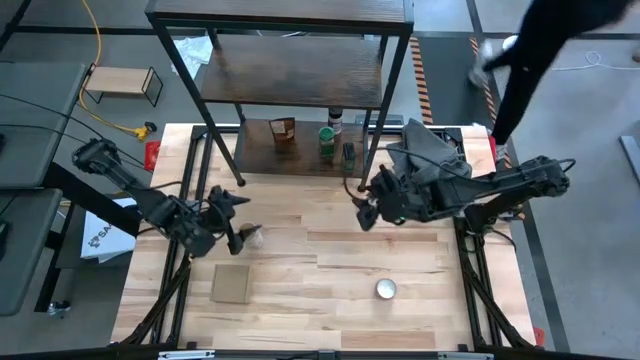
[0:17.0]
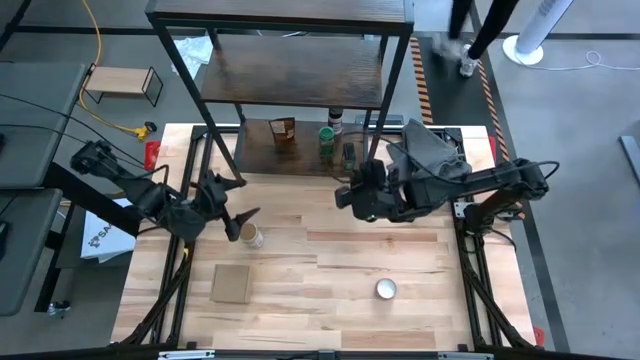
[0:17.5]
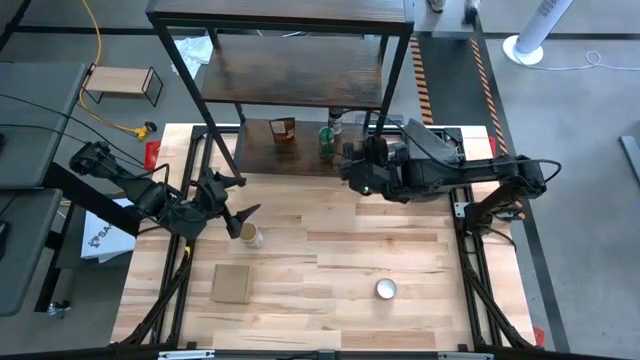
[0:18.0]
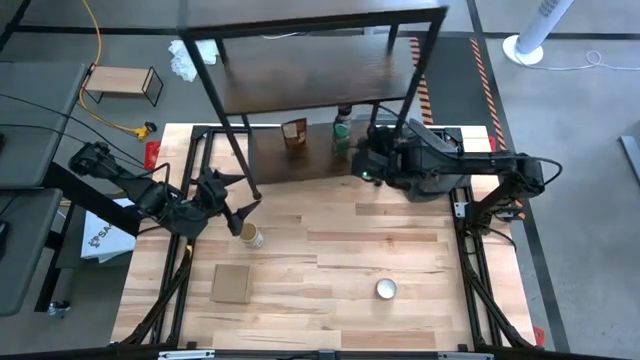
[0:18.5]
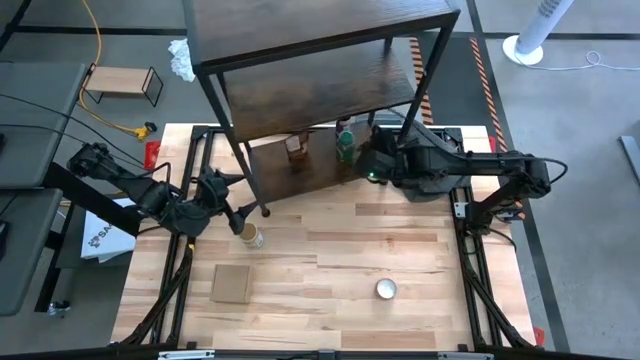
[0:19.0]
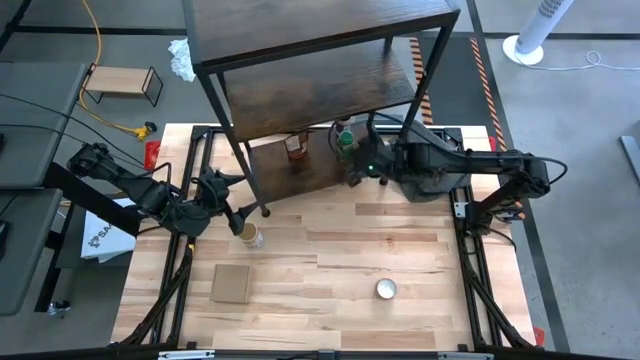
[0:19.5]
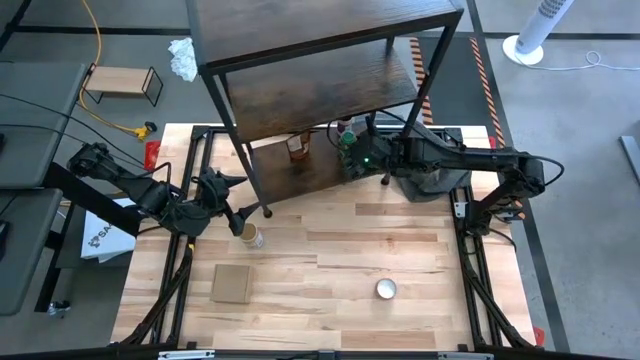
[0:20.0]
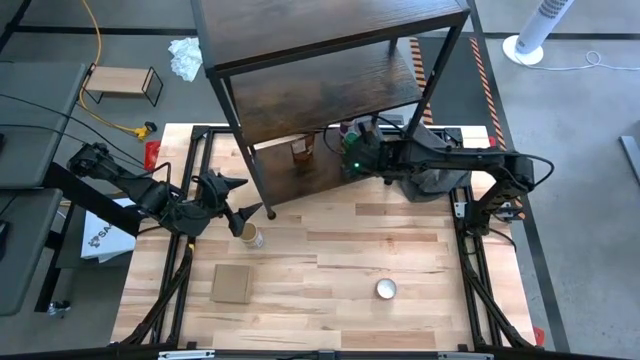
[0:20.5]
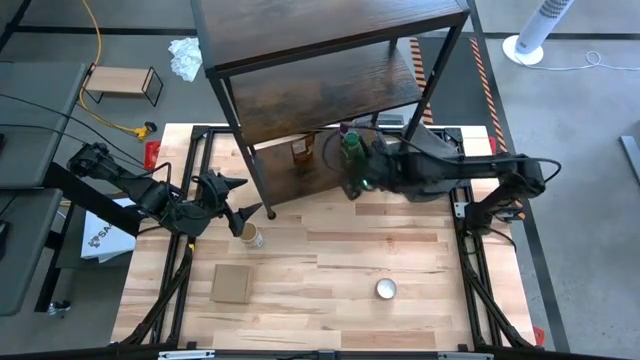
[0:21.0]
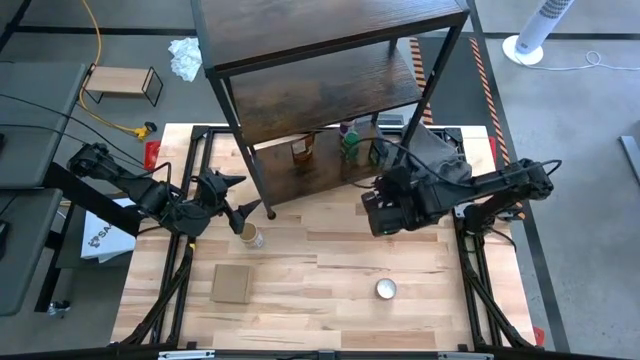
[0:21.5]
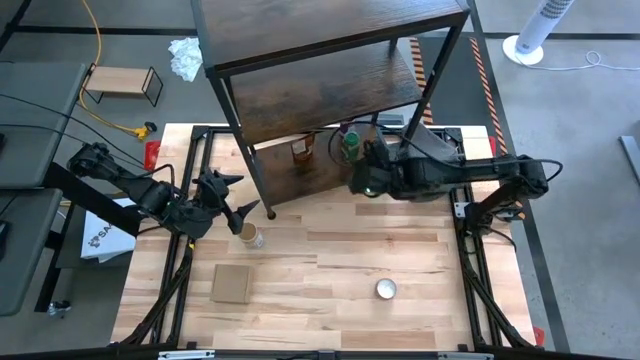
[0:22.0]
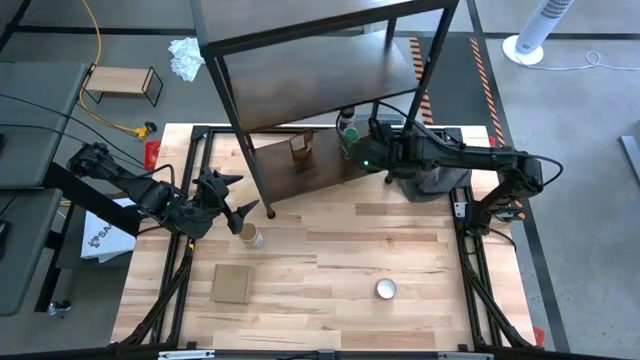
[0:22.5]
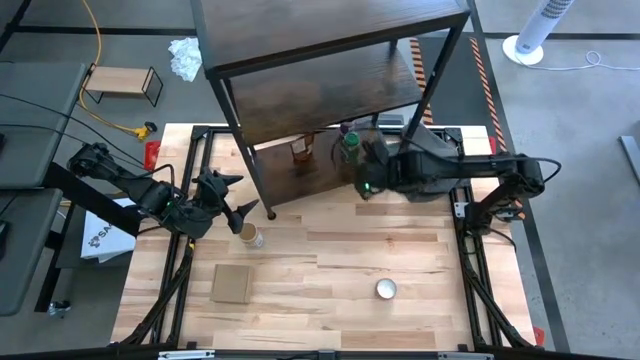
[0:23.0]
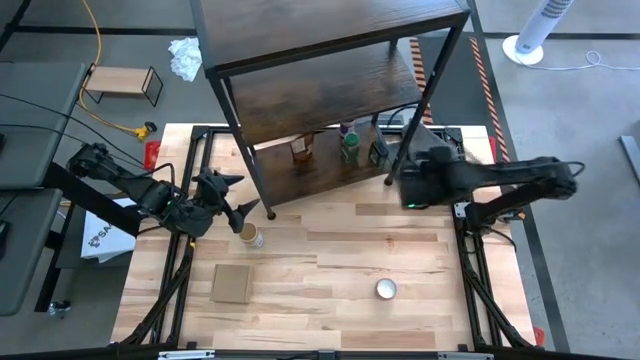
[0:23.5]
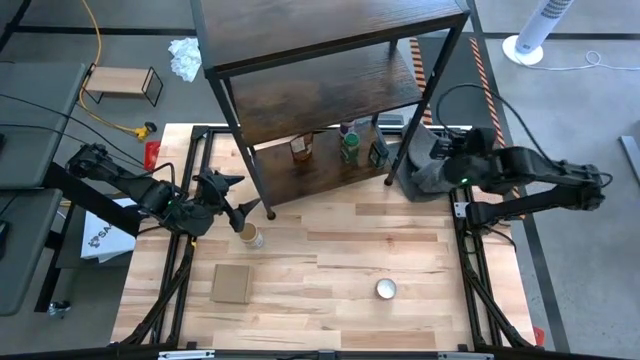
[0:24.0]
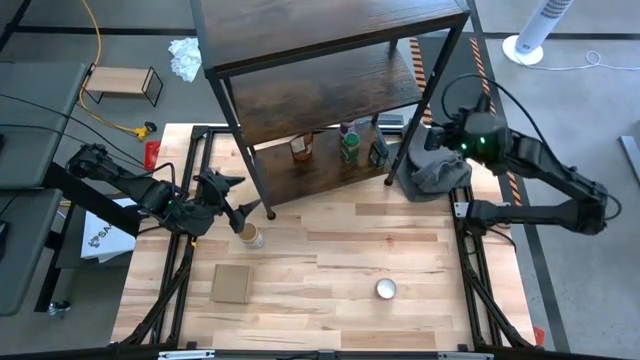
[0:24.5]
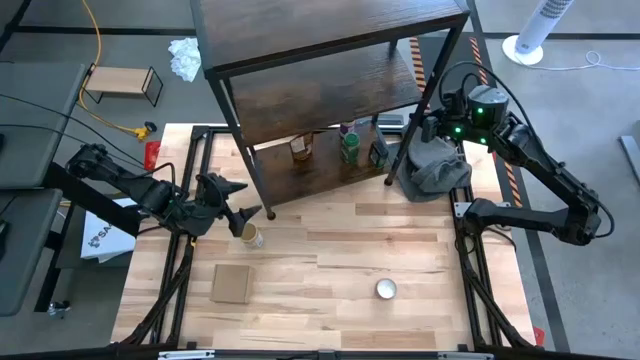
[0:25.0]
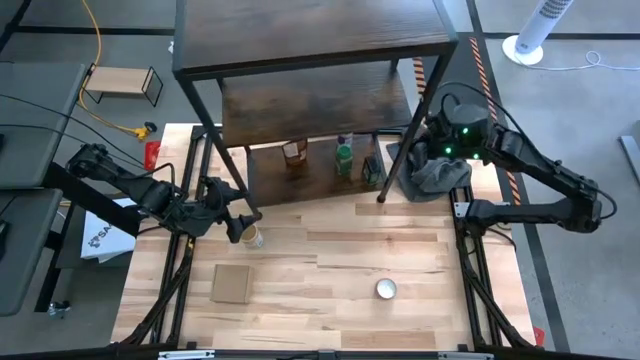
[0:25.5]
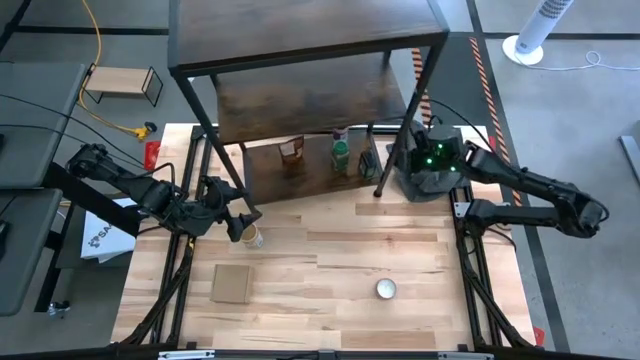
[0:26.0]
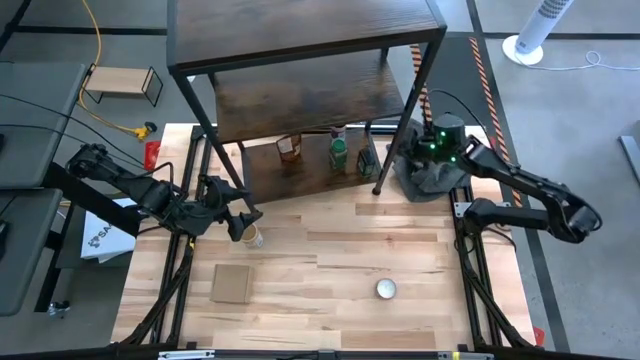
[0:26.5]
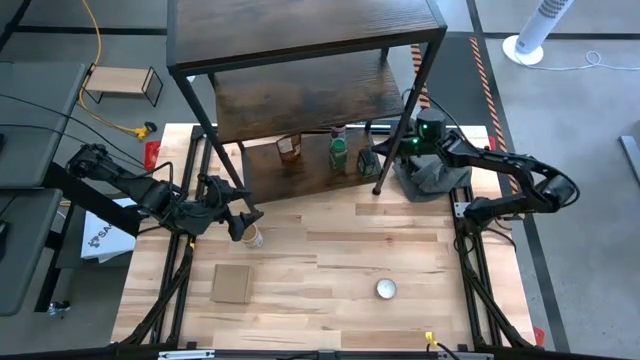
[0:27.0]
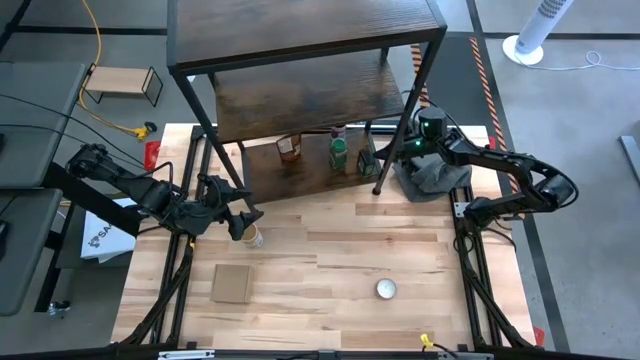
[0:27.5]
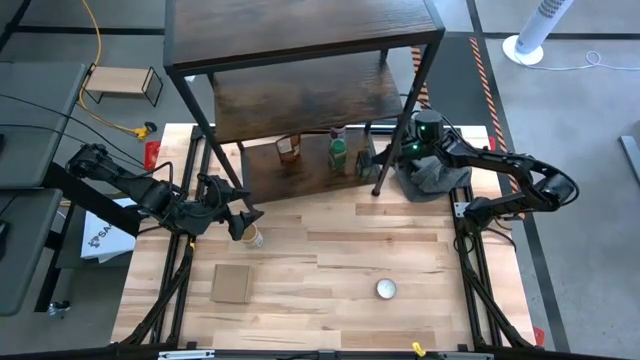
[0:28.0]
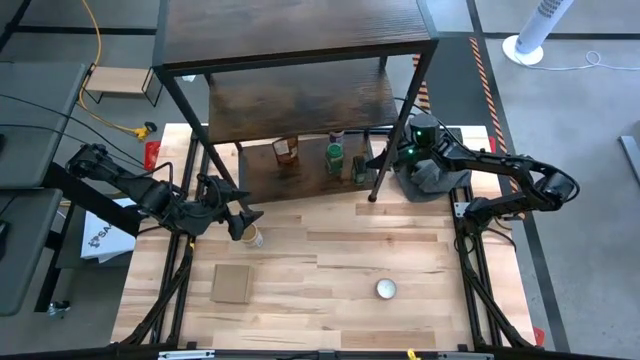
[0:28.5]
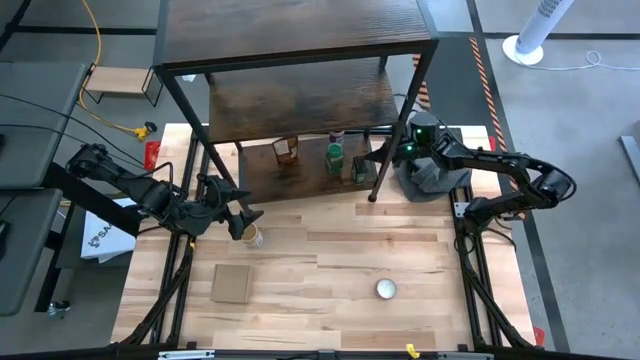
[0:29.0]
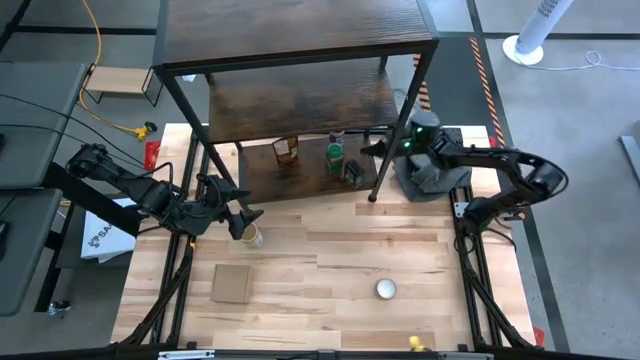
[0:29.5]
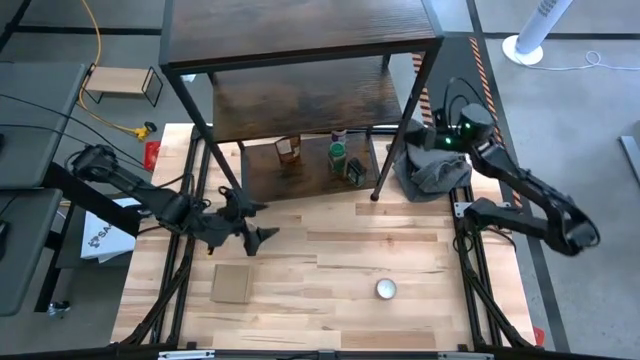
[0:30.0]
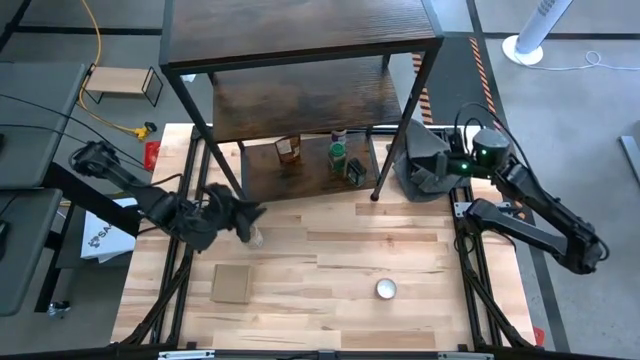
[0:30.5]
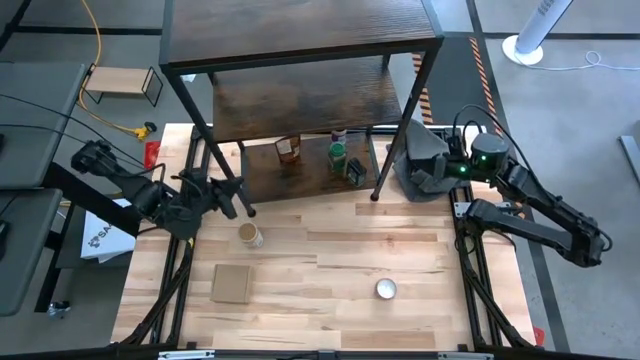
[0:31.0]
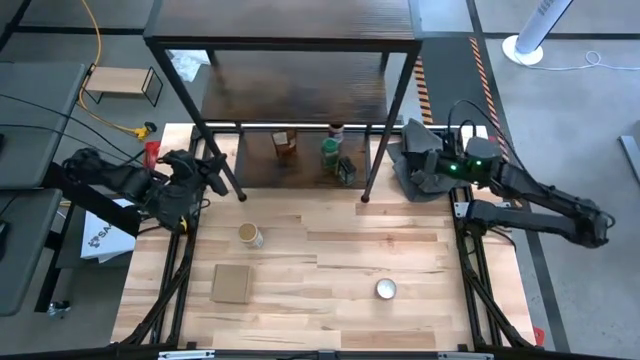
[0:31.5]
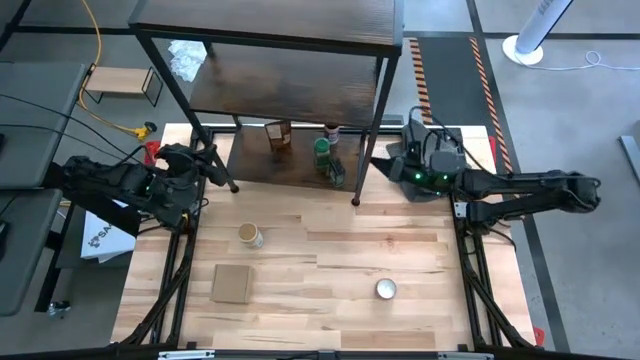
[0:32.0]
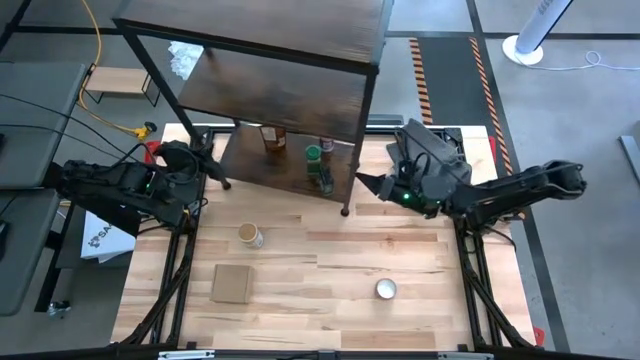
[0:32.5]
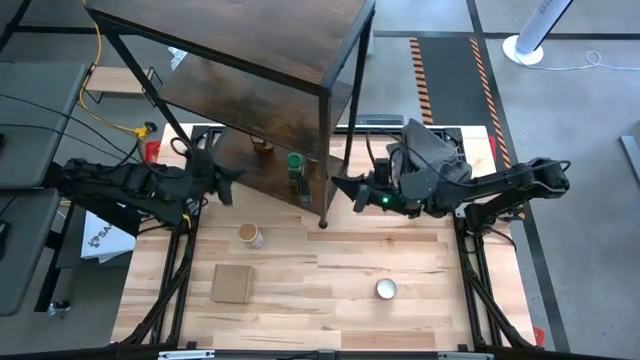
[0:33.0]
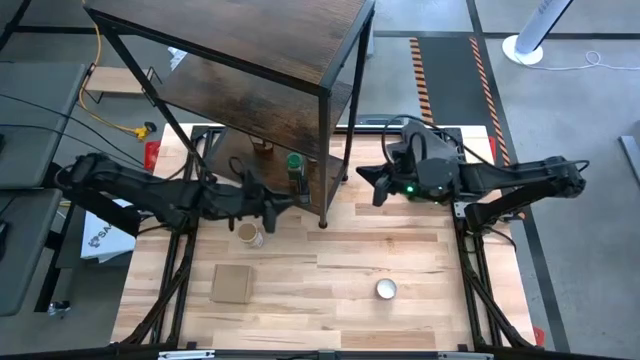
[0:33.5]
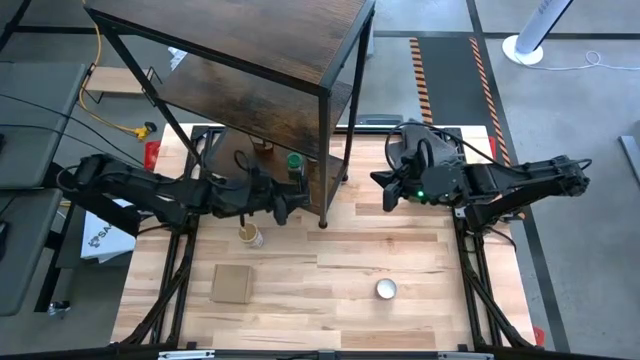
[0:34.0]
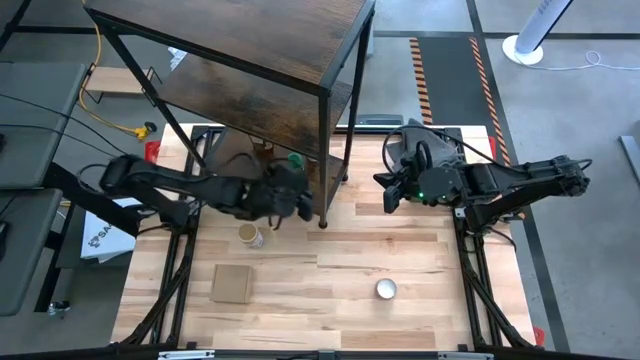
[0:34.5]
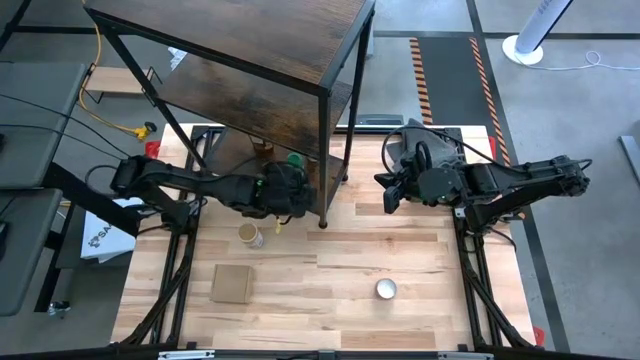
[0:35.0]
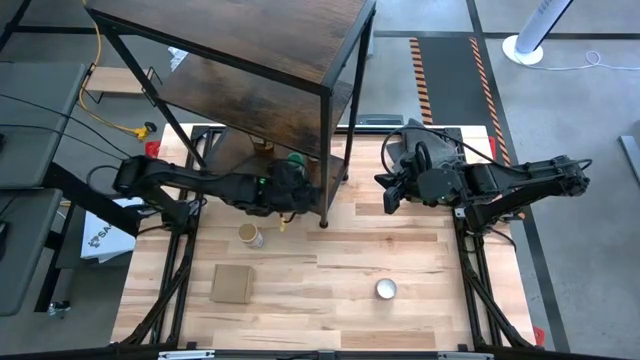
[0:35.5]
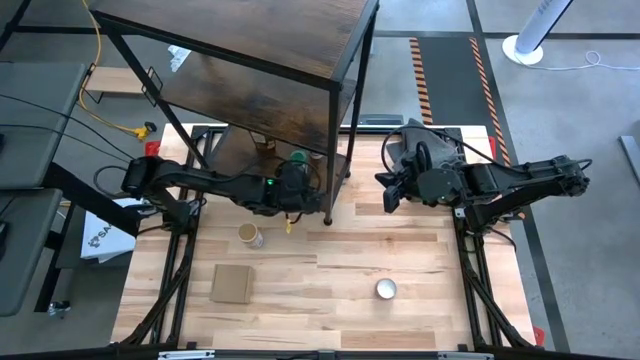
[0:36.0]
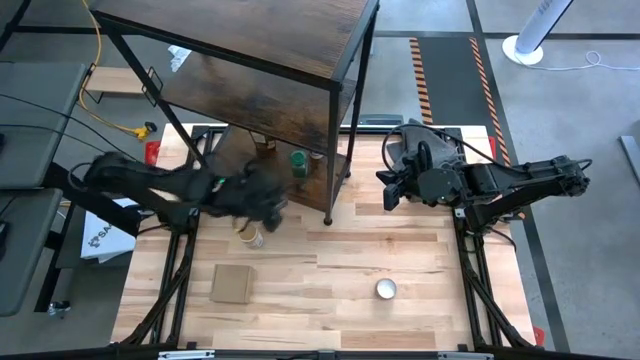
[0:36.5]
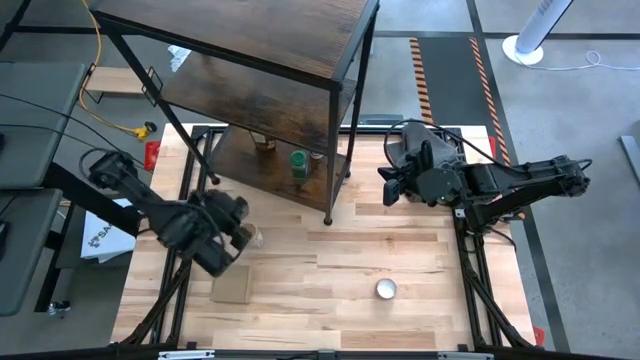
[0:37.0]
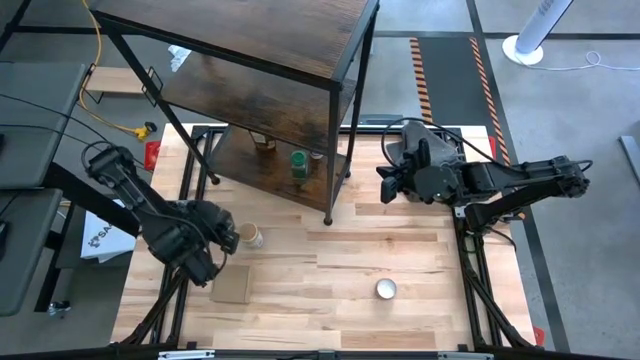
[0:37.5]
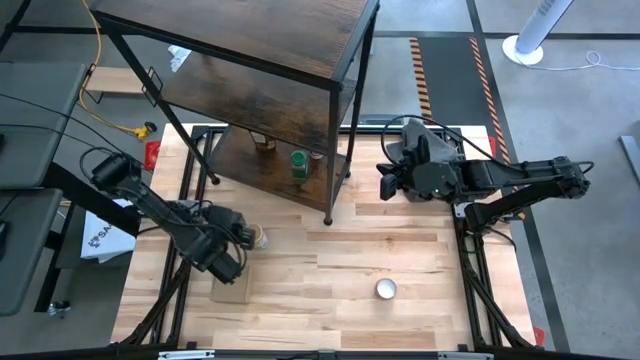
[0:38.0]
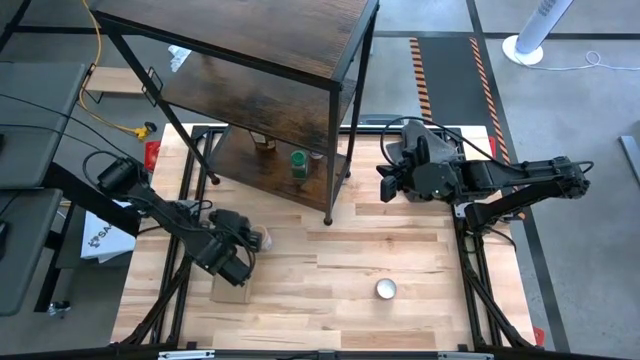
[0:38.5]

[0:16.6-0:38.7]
Task: Shelf spices
Remove the black seasoning can from the shelf
